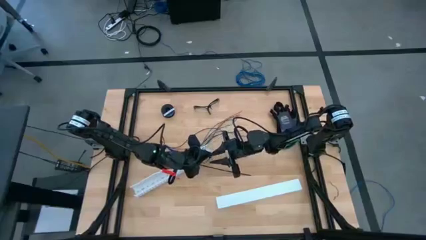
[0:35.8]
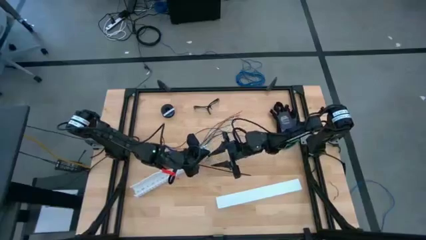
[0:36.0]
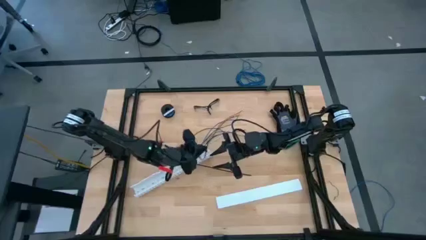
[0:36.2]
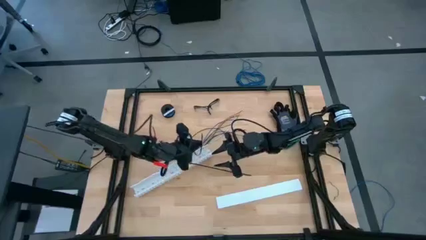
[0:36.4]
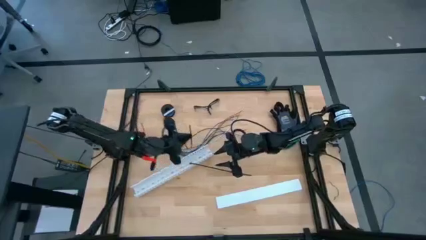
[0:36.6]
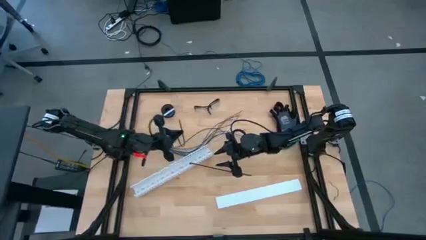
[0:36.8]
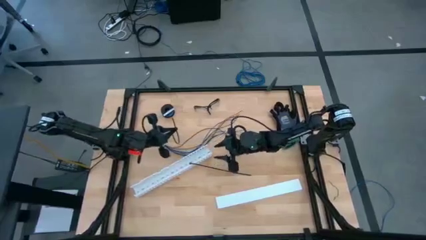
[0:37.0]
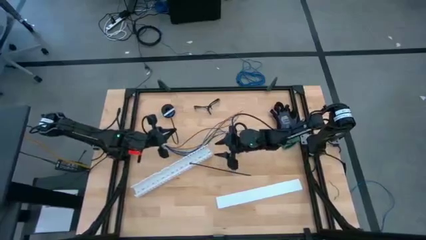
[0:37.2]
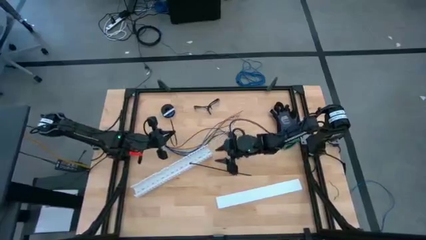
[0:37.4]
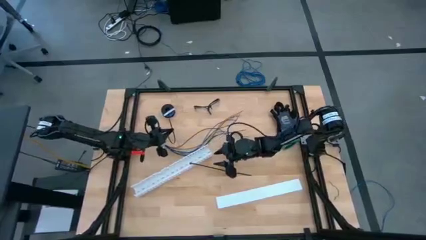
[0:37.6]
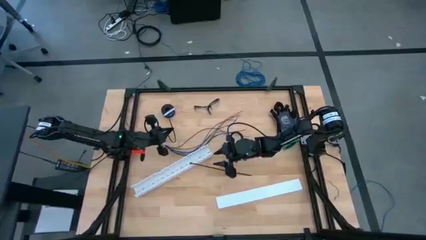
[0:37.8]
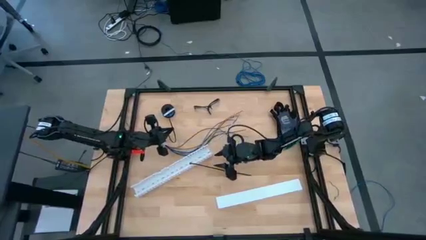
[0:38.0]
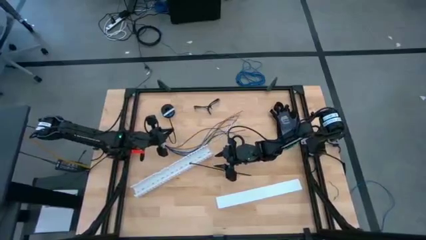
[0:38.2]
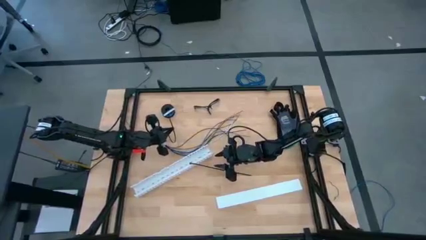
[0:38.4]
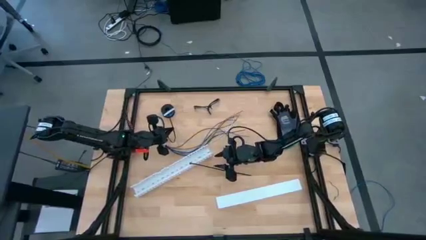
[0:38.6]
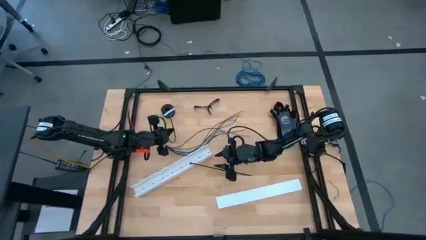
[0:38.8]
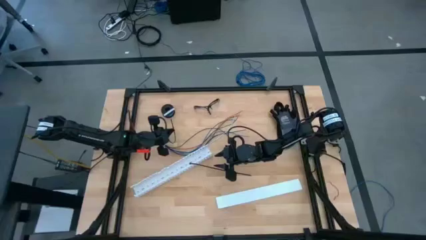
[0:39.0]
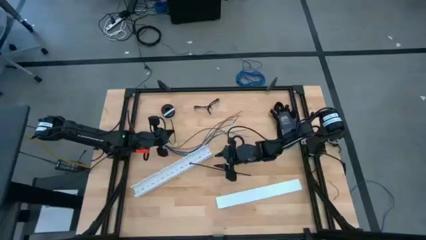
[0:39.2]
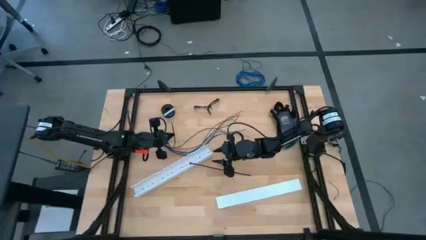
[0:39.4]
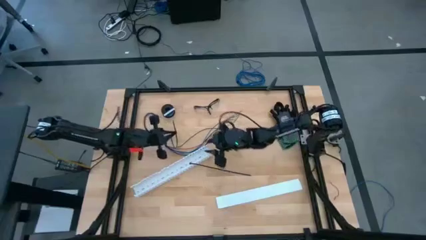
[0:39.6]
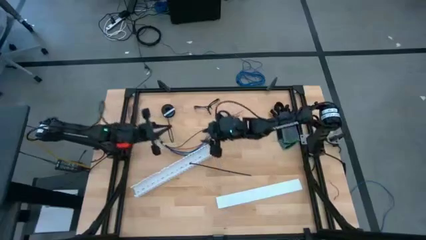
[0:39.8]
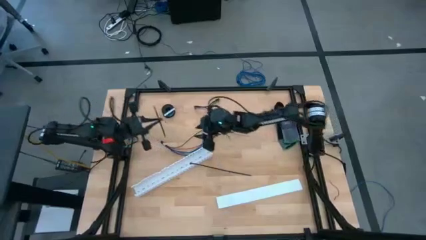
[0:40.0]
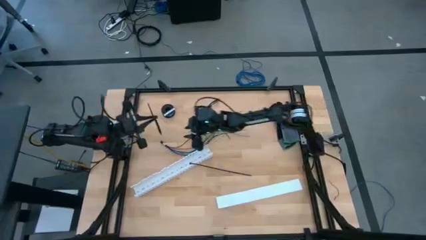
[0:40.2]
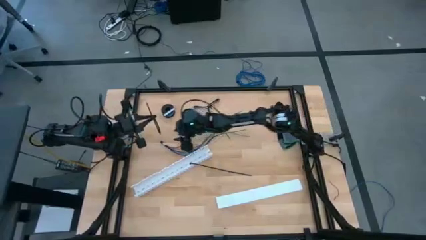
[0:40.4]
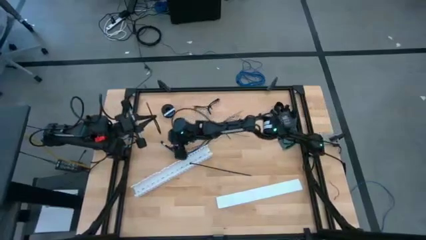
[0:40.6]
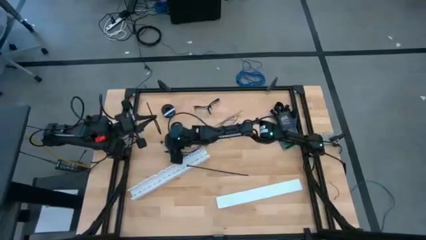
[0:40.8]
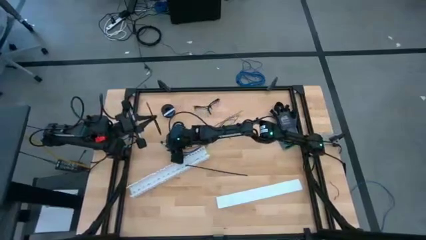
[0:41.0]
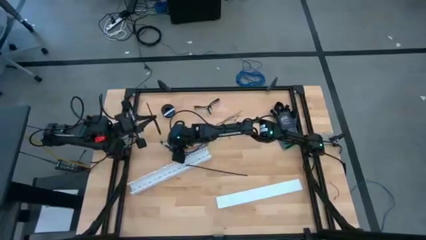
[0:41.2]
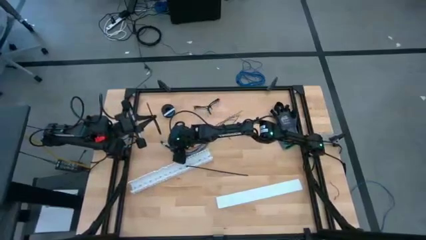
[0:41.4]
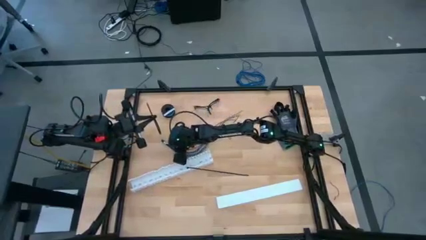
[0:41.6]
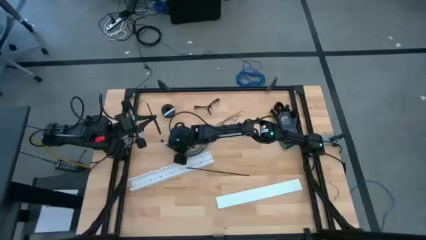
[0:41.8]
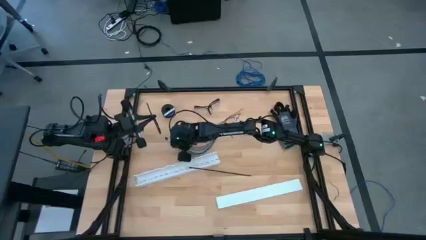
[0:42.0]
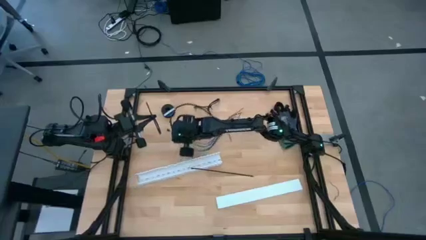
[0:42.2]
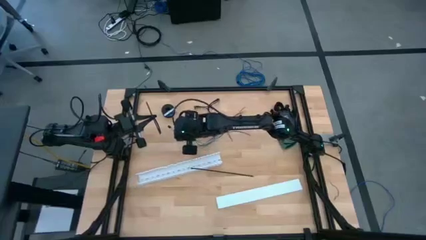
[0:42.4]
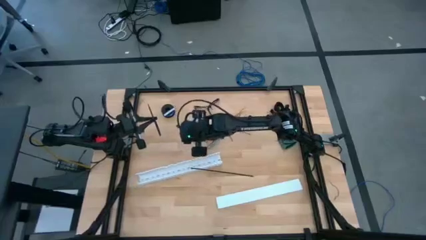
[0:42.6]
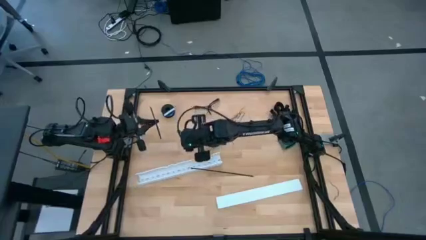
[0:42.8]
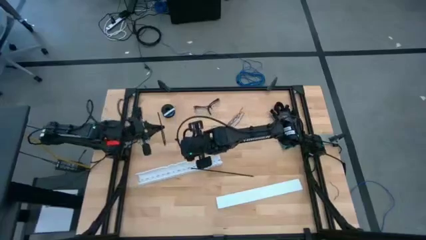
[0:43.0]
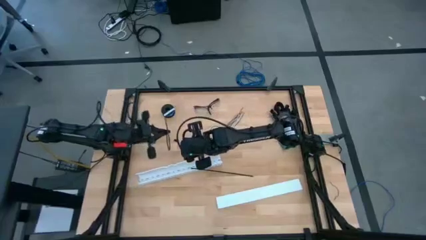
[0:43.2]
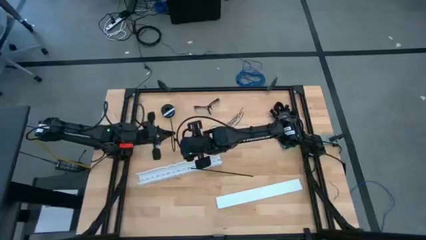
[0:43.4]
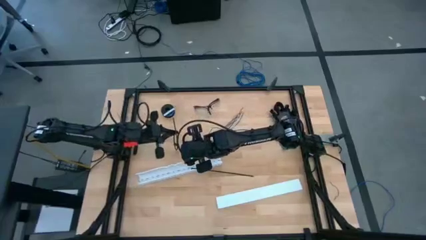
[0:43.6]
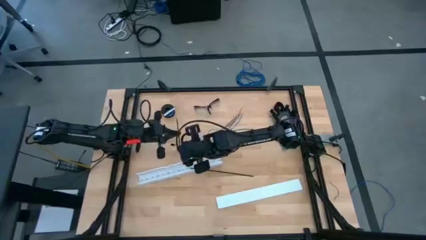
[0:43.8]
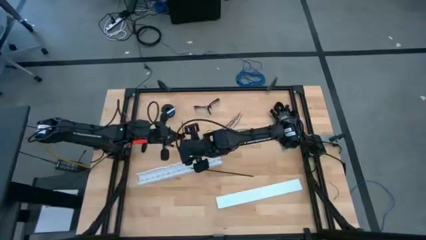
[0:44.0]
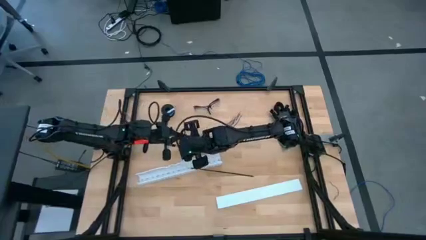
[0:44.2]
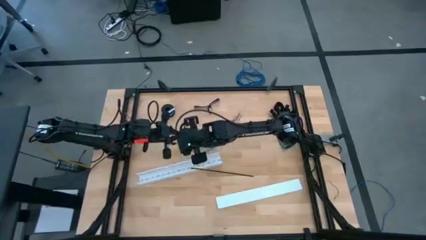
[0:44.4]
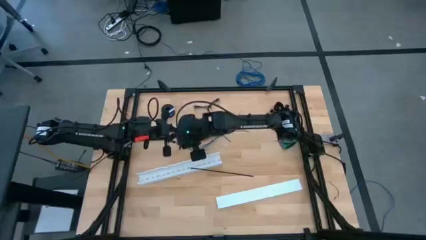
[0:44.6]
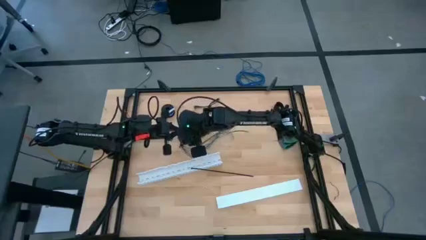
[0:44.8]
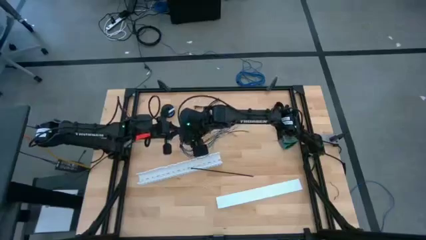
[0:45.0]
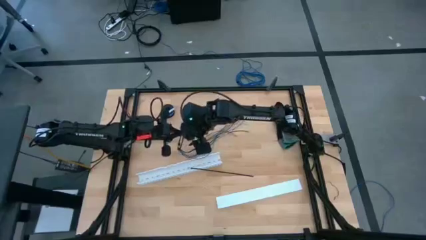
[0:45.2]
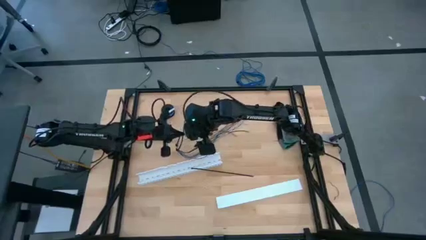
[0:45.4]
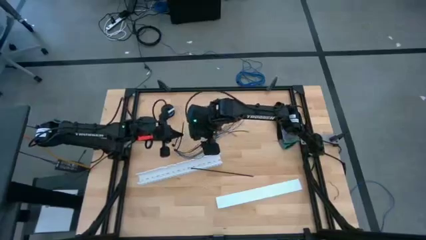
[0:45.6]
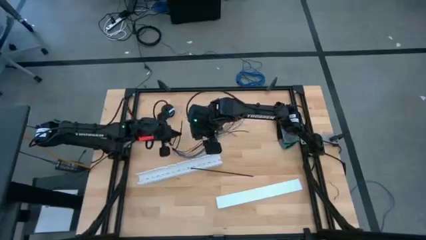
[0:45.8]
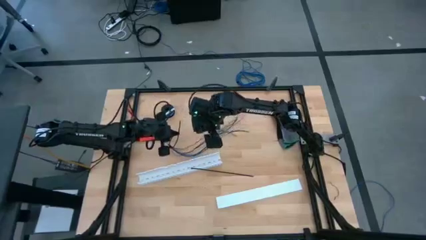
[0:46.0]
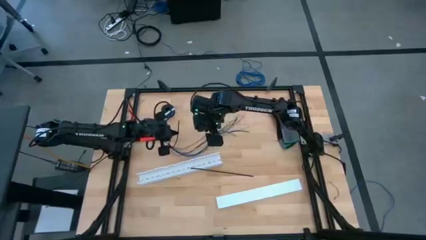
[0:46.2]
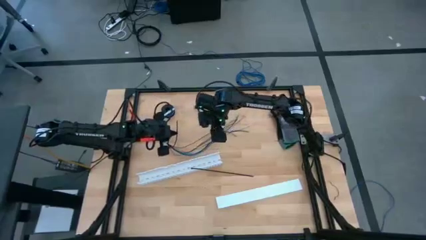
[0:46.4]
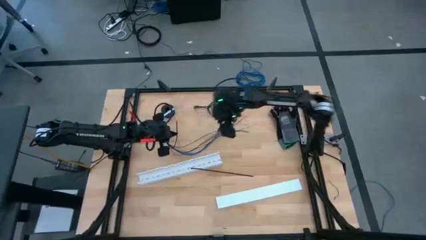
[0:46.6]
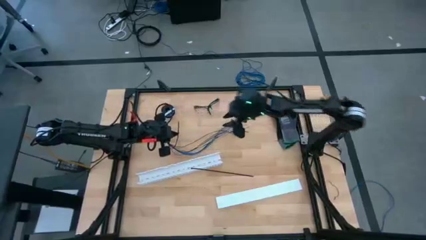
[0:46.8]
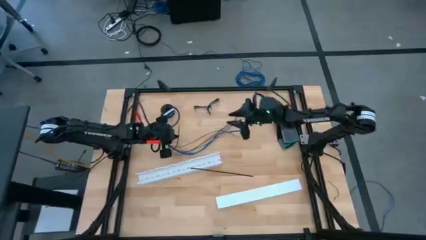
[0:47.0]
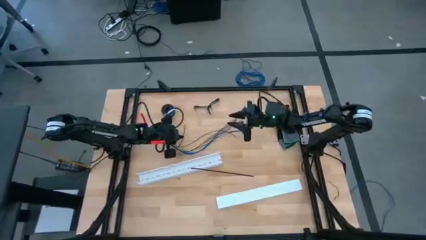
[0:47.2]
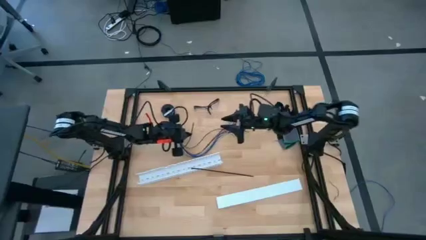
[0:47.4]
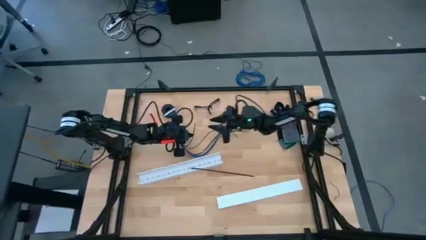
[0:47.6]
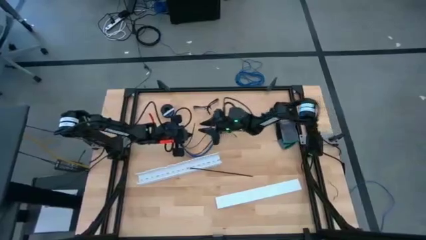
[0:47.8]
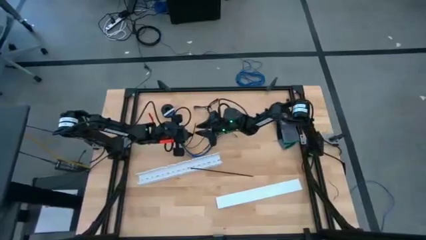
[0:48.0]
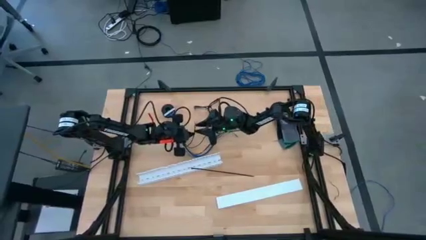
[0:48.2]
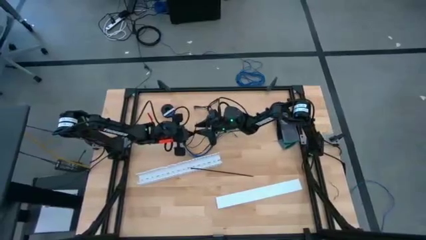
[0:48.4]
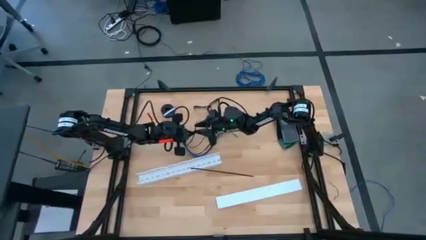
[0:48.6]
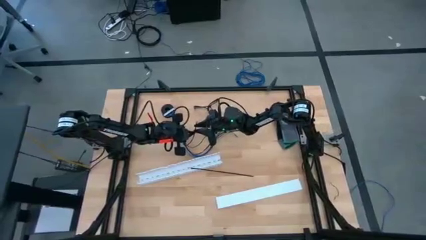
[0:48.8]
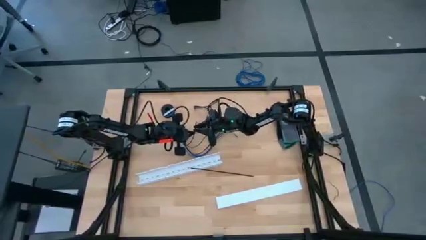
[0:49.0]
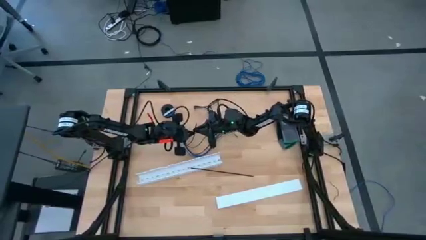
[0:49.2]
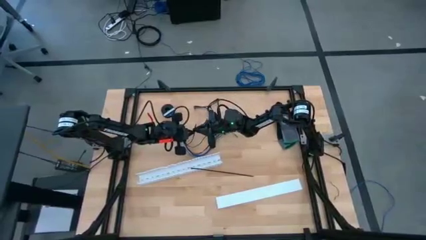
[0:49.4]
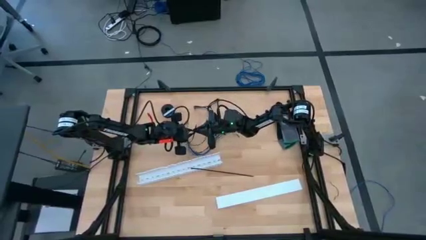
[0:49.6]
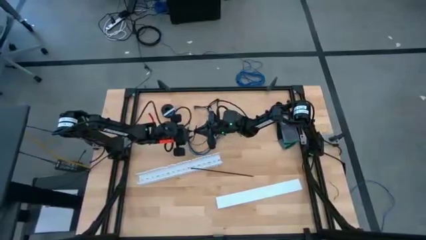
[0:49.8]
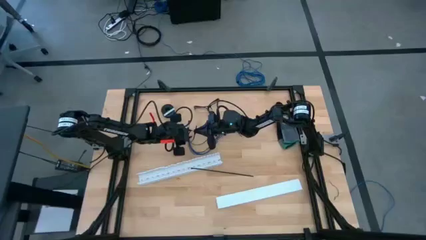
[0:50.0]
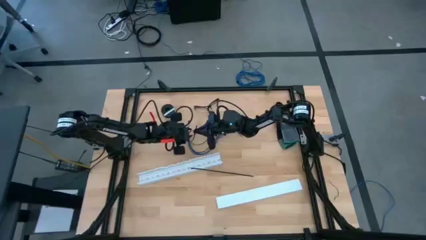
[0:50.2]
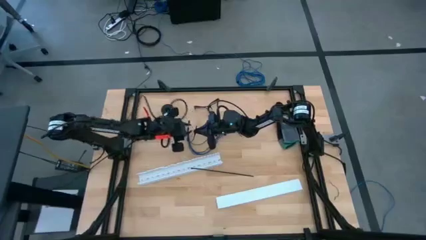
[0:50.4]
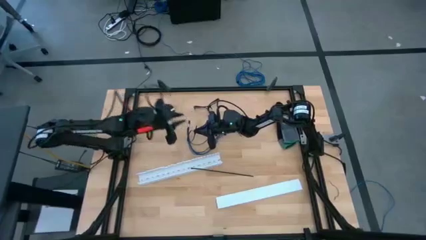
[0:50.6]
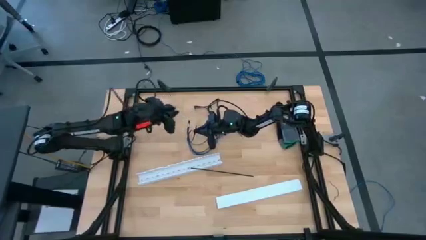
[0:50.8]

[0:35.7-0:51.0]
Task: Ziptie cables
Wrap the cable wires with the black zip tie
